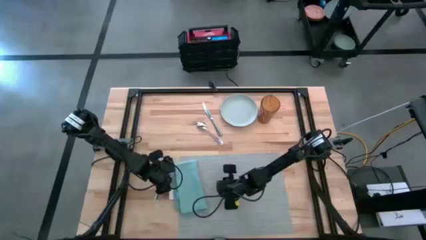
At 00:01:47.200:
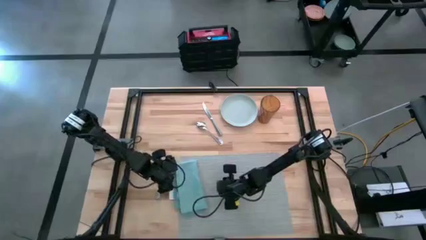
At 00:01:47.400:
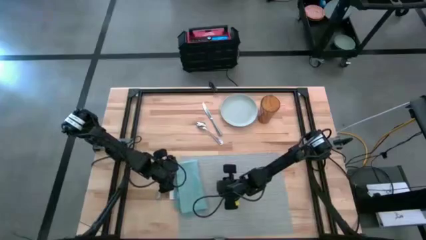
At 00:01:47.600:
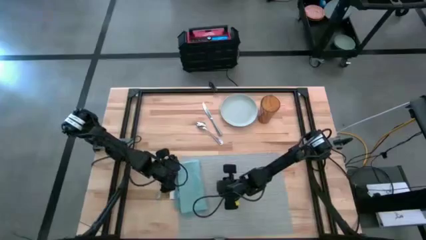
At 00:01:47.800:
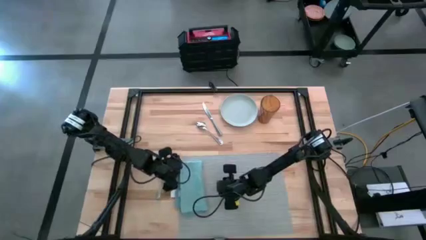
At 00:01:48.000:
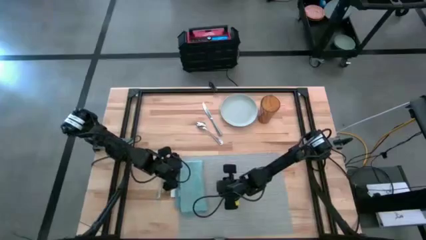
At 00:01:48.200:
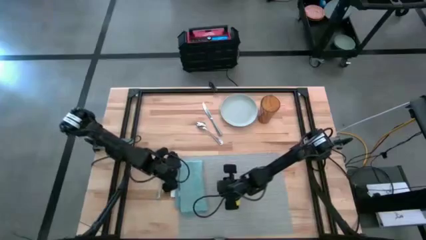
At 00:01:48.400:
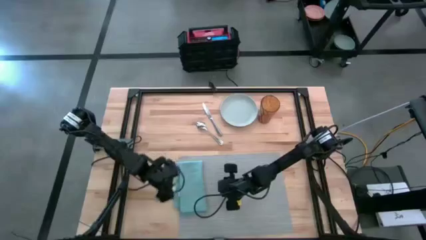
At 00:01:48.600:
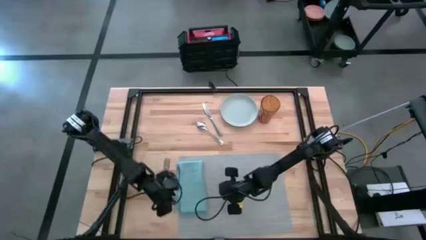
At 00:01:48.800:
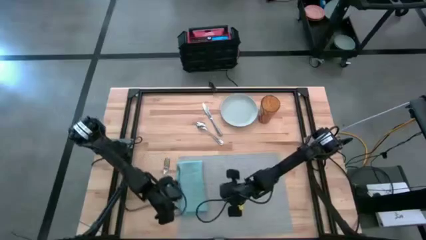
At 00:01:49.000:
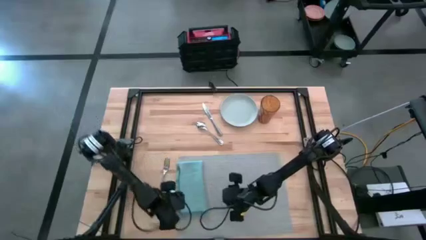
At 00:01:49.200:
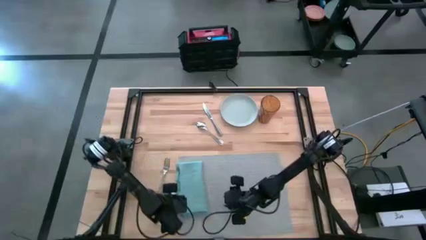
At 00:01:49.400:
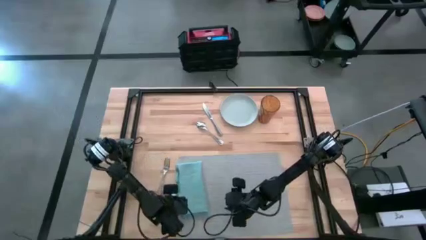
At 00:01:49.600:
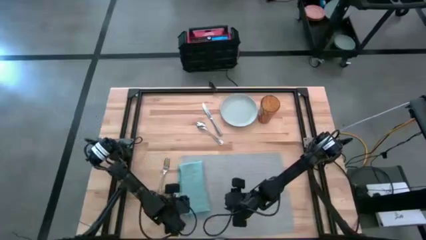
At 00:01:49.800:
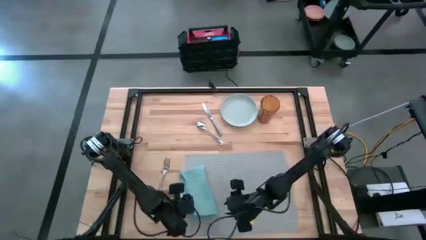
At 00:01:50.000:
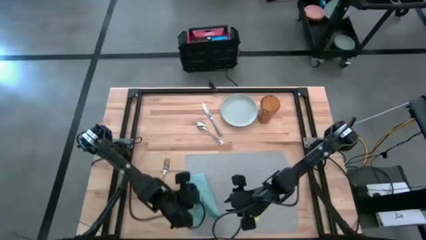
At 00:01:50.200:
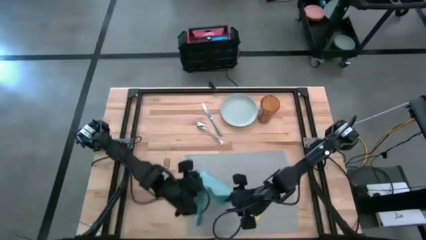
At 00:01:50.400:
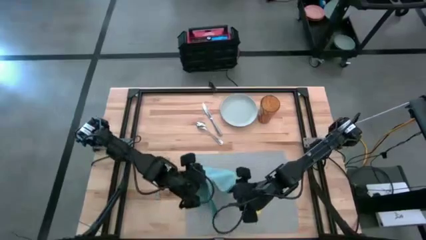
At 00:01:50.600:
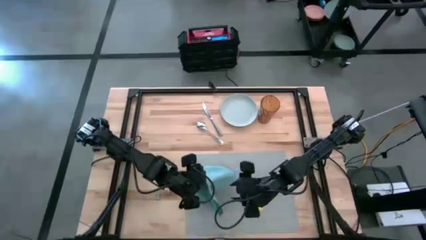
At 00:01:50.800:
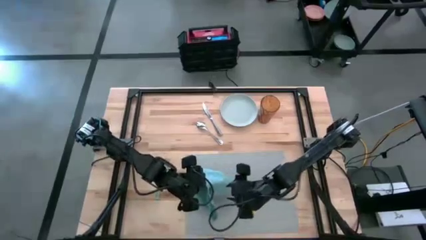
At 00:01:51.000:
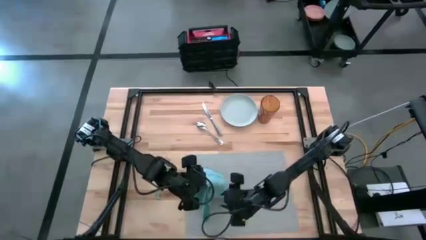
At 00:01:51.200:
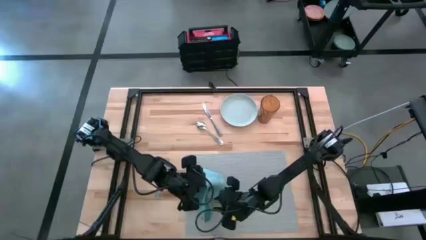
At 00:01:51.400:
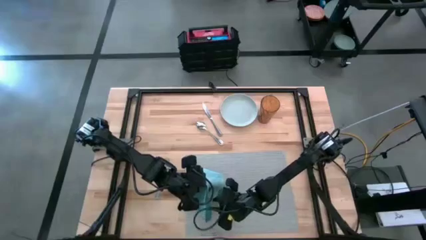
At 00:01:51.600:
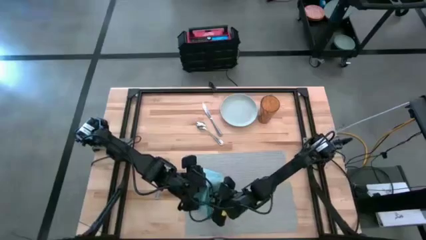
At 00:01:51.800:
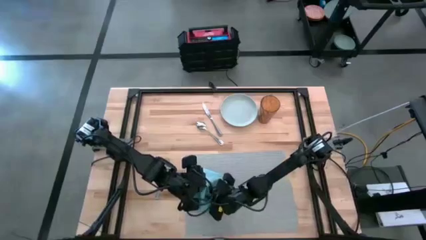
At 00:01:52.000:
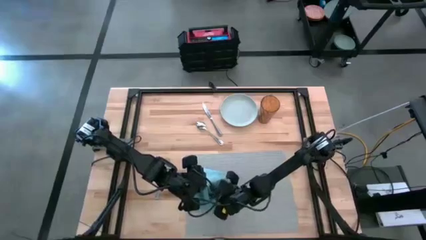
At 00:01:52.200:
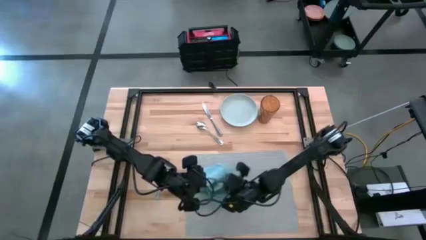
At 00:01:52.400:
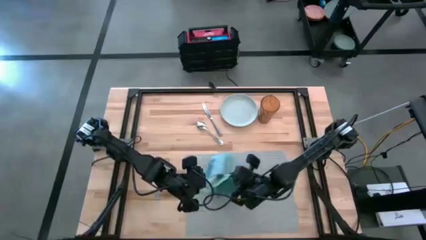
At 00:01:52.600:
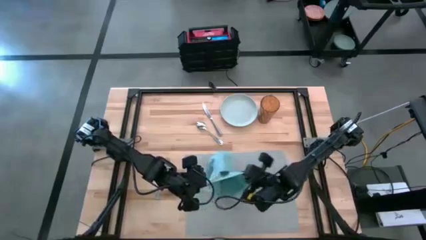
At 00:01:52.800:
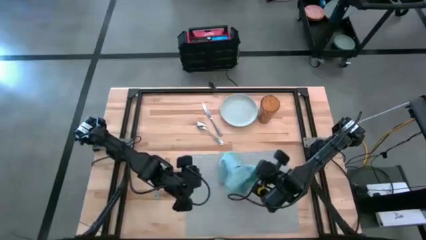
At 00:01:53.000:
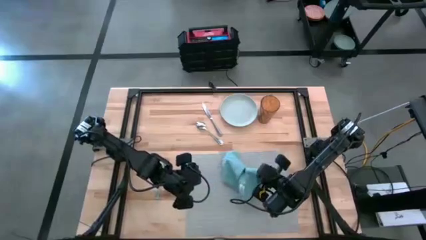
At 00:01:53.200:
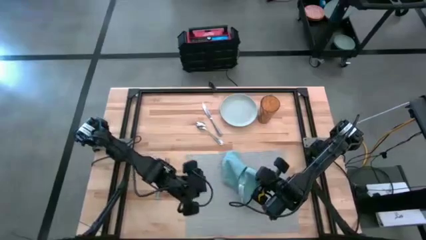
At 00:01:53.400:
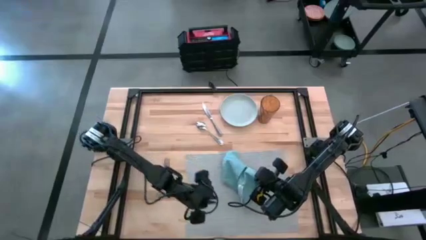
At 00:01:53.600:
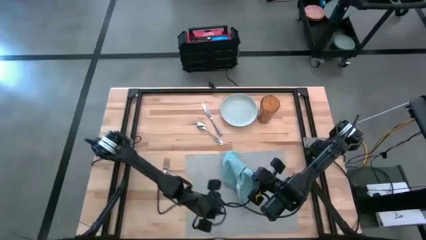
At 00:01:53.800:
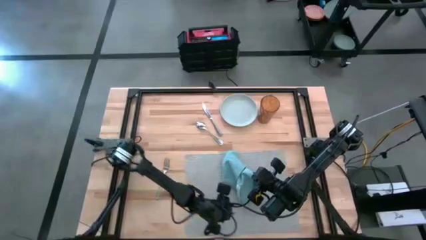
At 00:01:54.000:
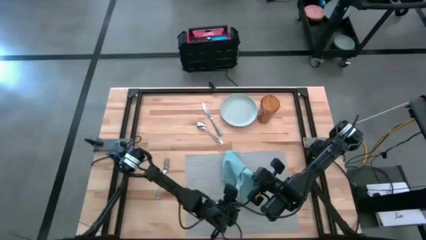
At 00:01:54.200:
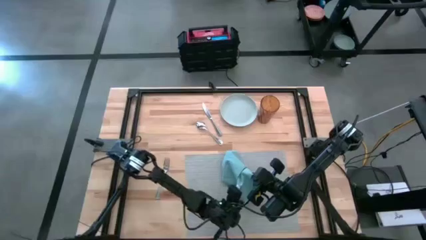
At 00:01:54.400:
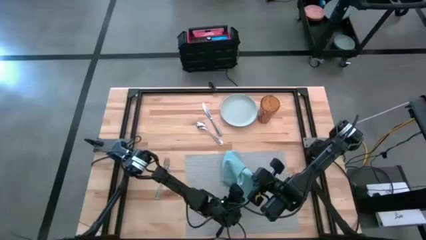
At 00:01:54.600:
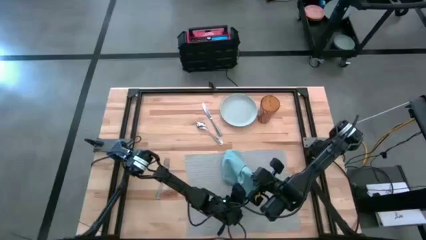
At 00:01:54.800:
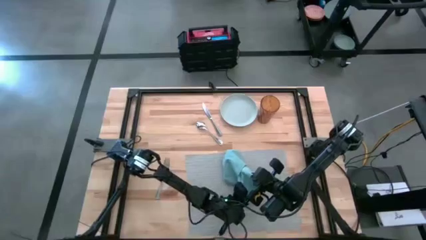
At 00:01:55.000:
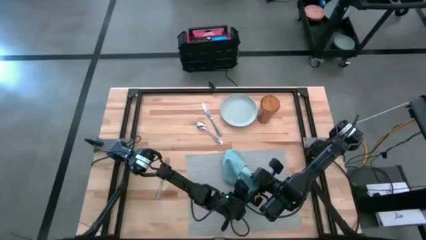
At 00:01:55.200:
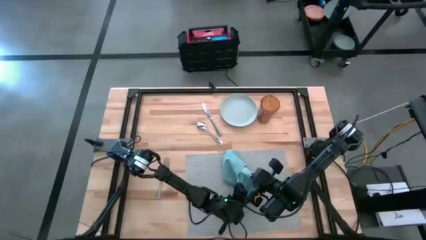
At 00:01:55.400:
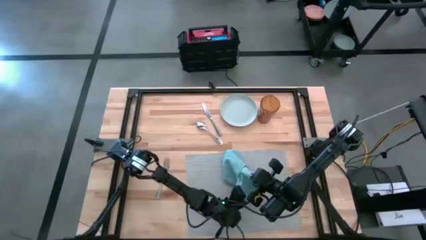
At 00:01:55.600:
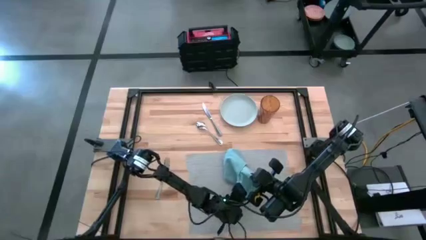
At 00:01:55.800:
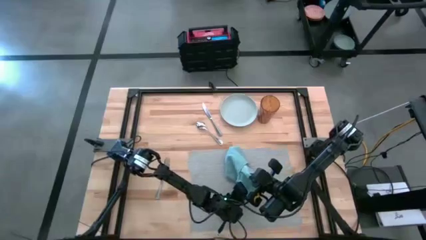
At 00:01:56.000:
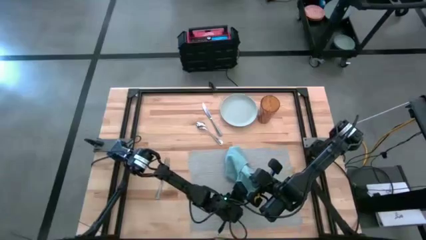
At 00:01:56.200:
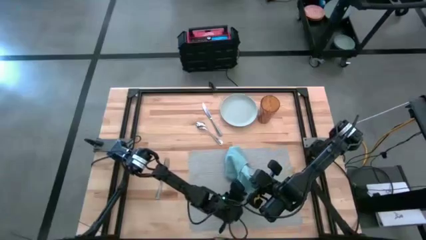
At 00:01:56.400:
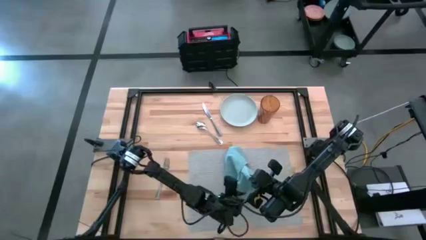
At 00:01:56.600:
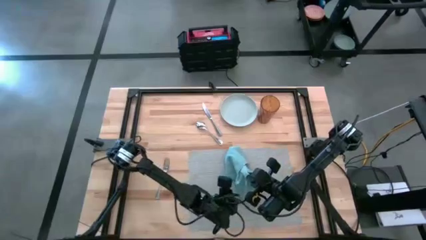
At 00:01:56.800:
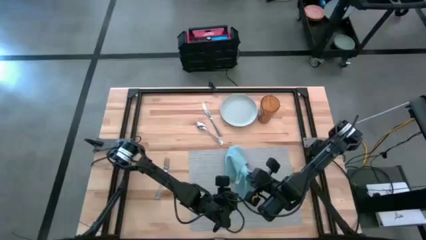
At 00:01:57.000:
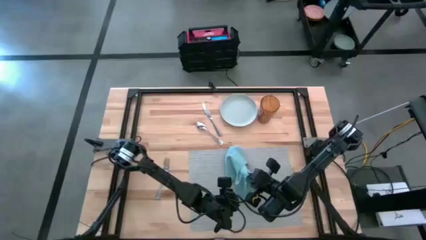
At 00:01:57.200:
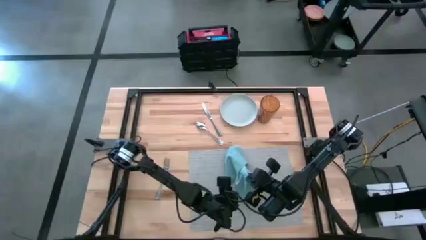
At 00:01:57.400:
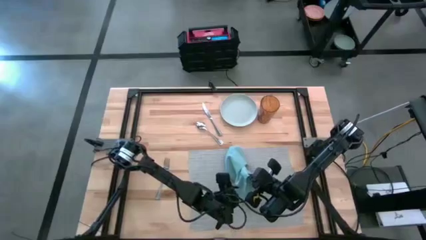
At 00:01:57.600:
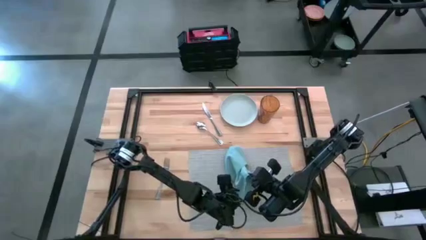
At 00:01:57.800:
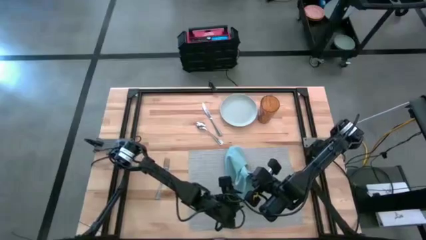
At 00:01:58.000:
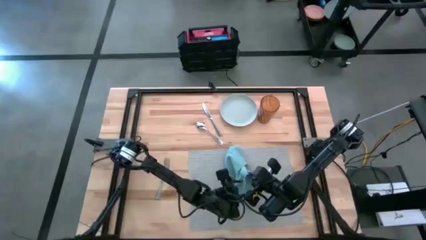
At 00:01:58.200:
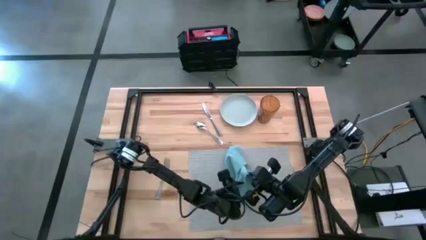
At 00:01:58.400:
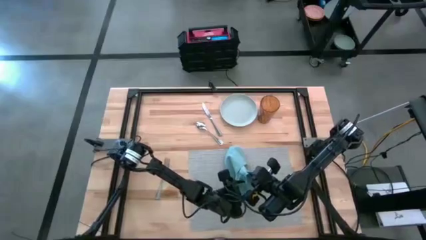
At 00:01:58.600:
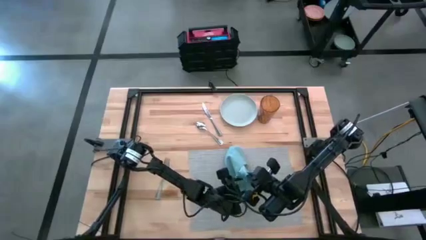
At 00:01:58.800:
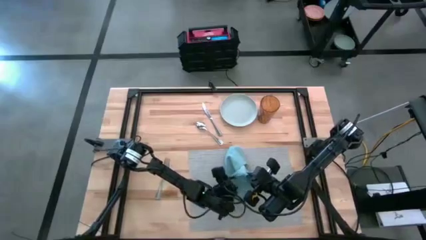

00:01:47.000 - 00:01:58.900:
Task: Set table place
Fold the blue napkin on the gray placemat
